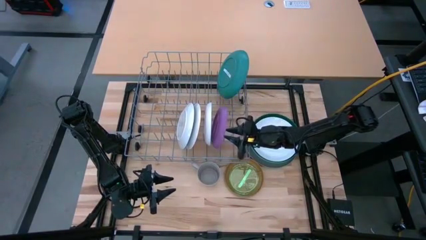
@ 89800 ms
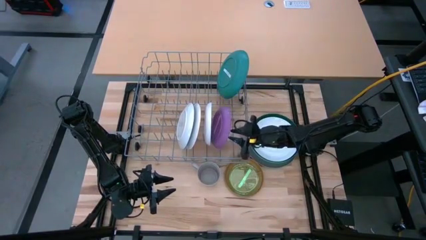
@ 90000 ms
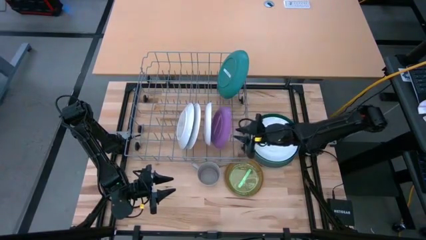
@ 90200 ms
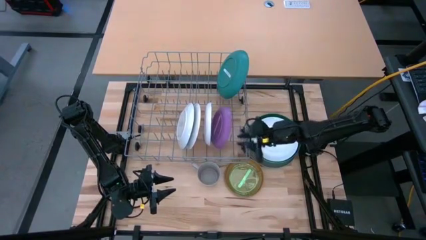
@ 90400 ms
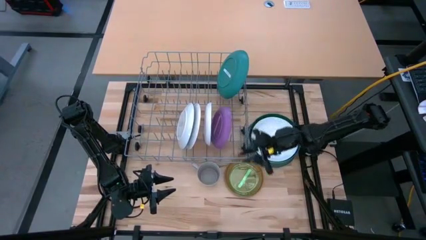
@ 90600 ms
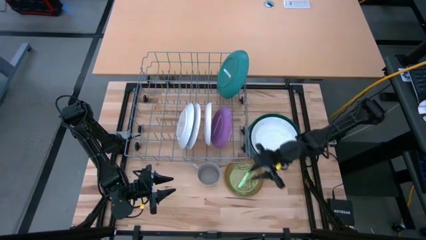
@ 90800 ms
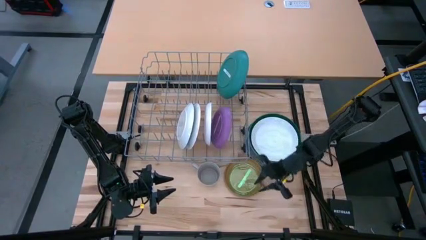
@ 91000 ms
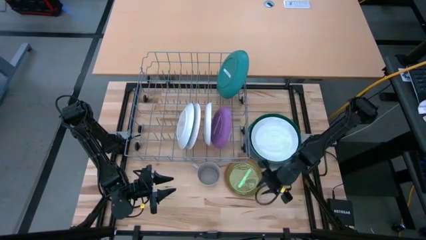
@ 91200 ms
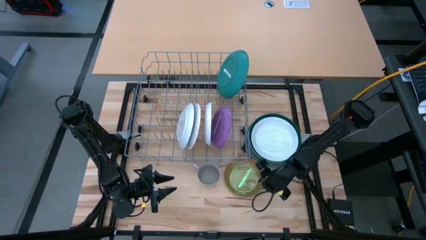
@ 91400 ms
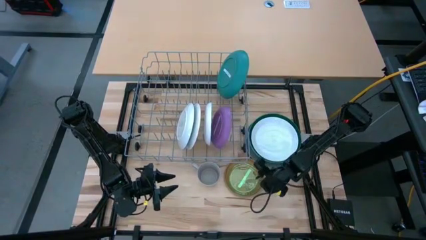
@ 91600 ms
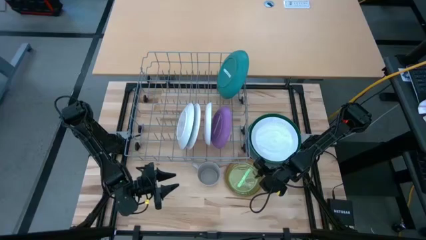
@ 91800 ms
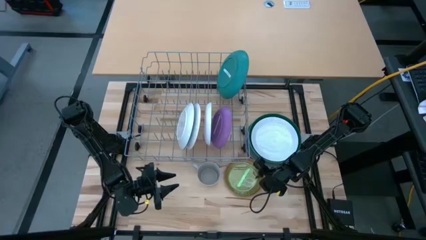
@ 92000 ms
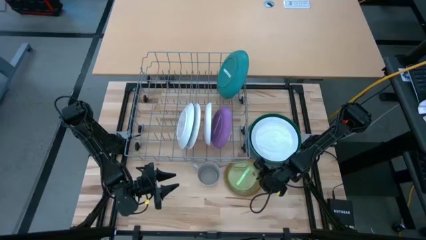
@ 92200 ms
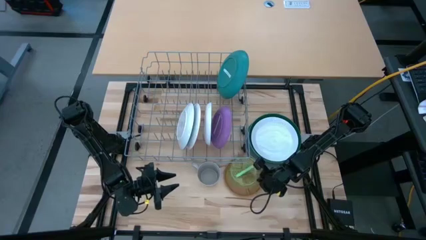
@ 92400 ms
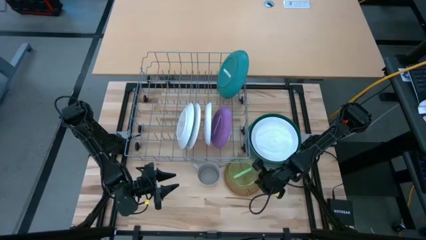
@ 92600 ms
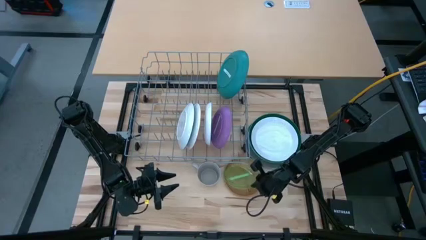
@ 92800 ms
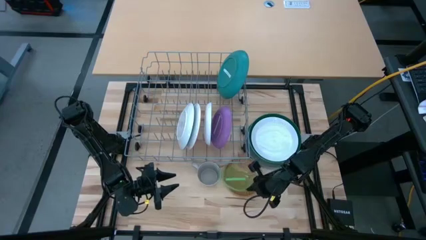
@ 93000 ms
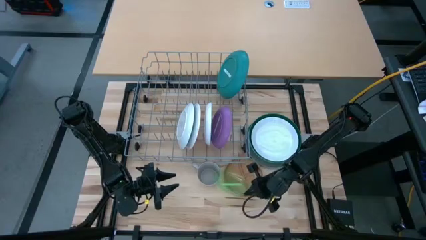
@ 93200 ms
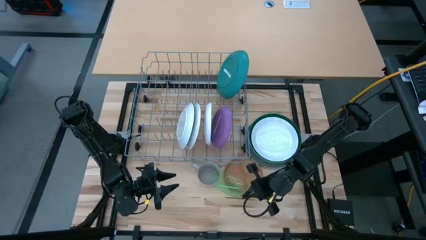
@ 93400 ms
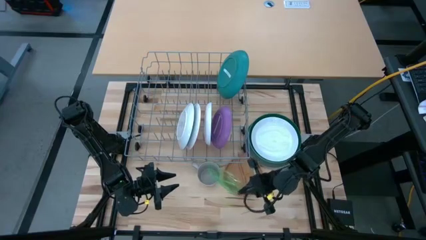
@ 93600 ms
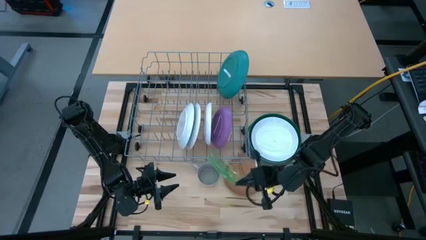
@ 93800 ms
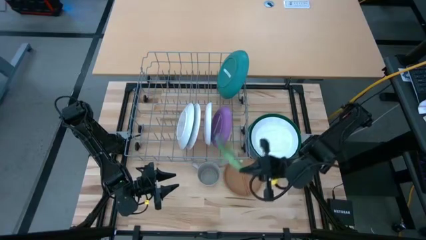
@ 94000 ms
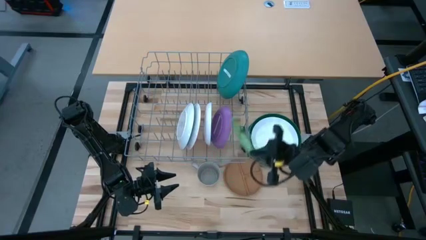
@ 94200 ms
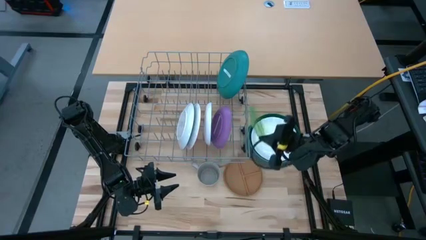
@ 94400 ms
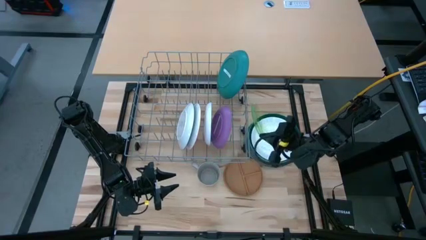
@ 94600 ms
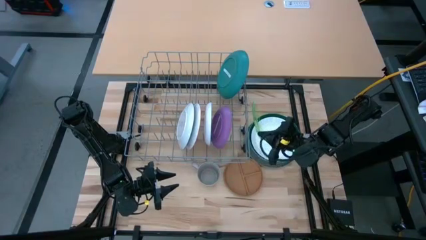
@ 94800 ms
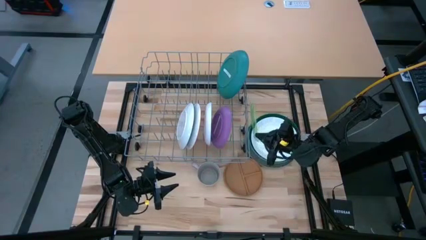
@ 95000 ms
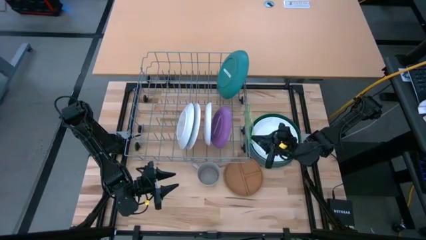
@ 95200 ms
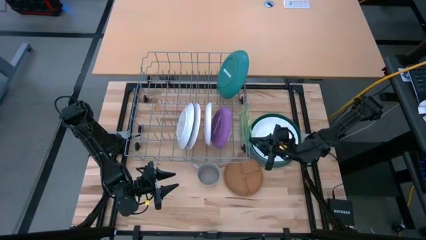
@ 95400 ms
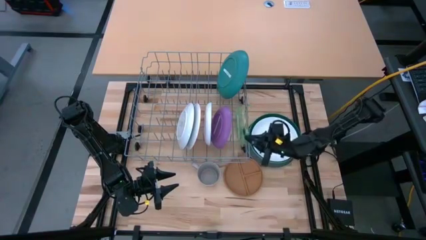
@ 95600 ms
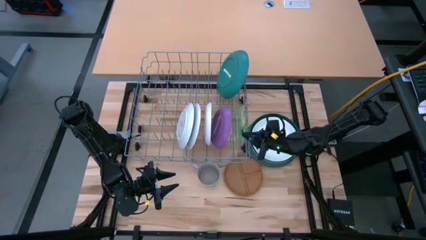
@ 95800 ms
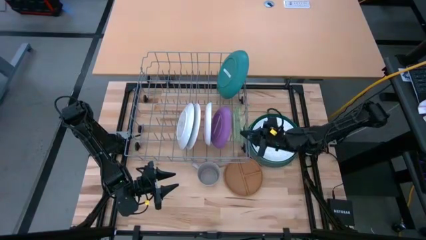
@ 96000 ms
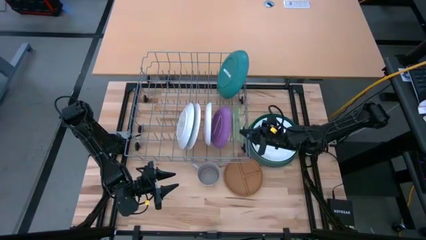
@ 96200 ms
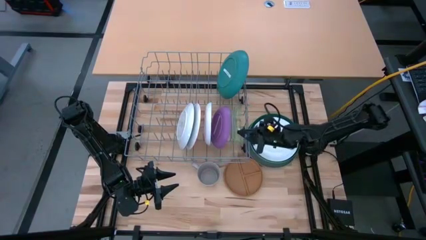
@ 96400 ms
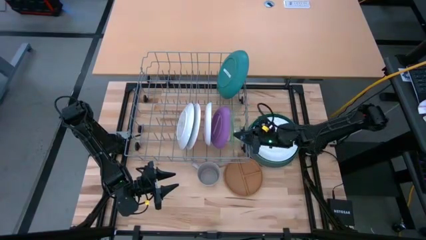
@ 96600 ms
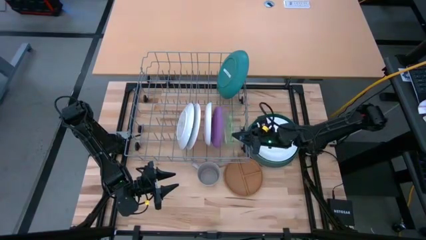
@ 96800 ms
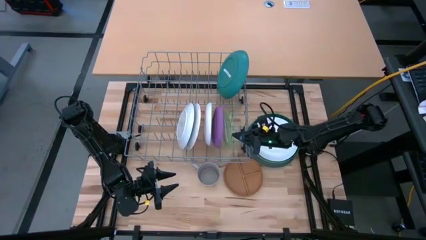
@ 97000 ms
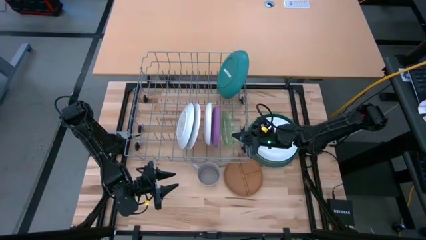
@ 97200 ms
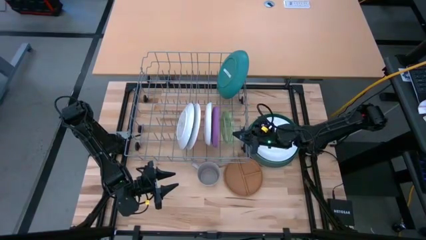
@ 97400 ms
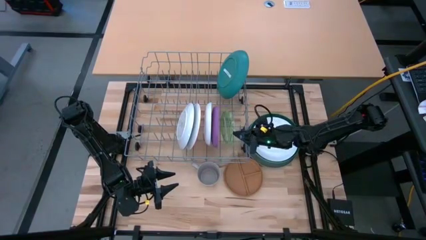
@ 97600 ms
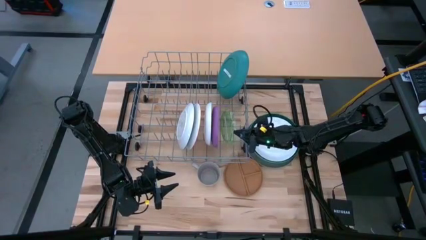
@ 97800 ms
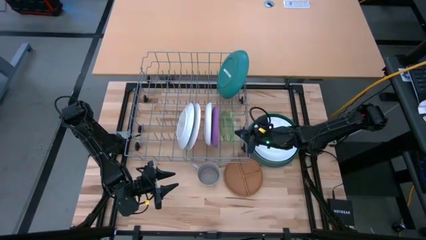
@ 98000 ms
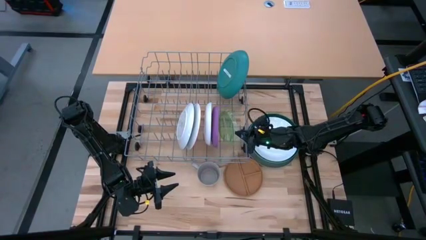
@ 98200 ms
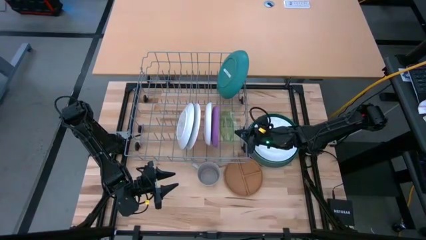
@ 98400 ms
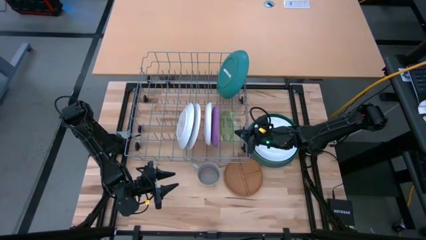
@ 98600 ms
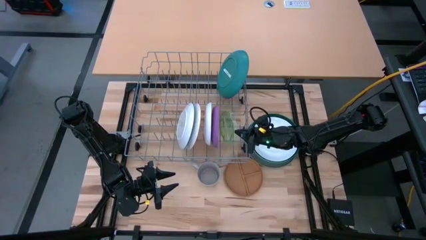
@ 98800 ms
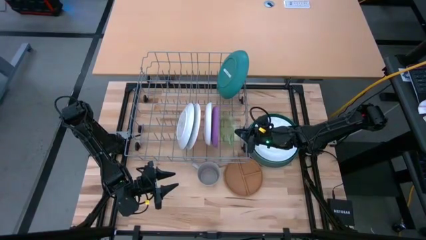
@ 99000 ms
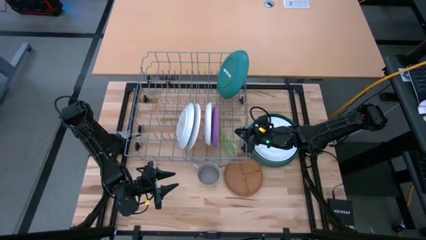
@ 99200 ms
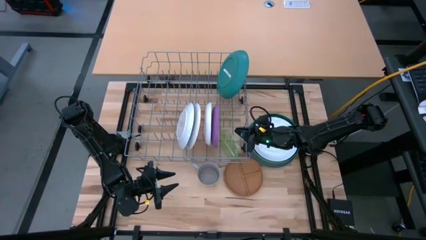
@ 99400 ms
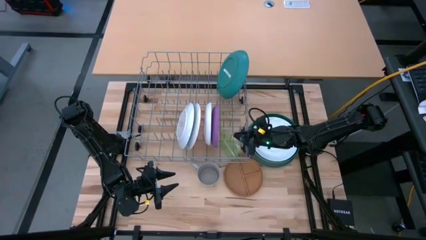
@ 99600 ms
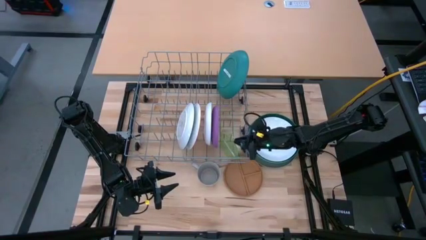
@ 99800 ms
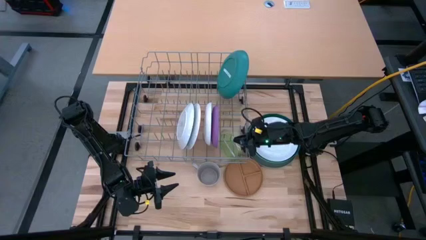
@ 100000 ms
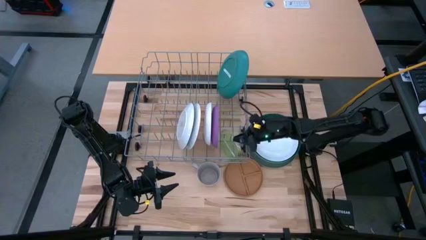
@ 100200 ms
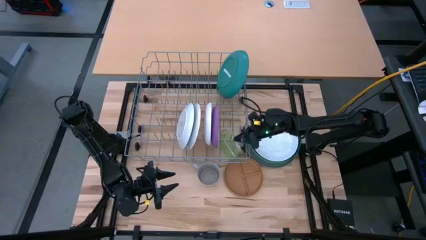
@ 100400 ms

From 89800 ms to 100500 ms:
Task: Sort dishes
Put the green transparent plate in the dish rack

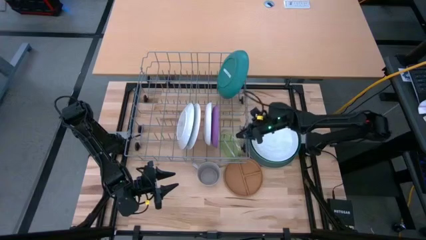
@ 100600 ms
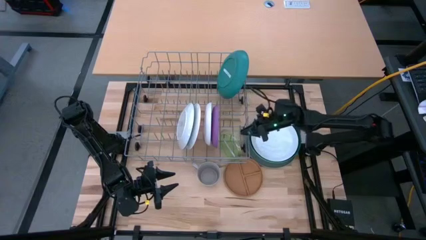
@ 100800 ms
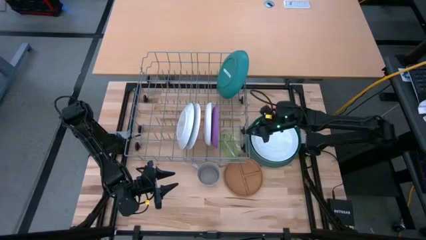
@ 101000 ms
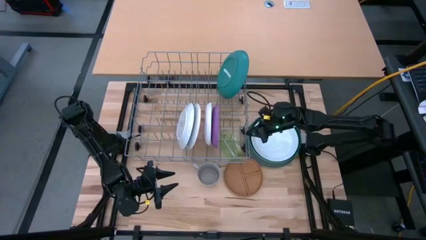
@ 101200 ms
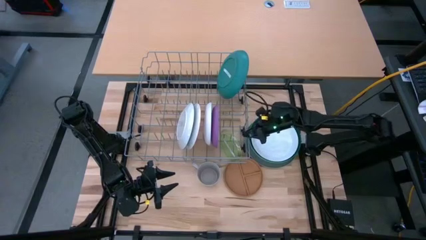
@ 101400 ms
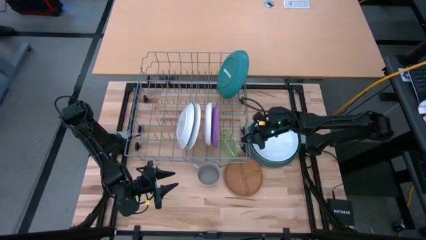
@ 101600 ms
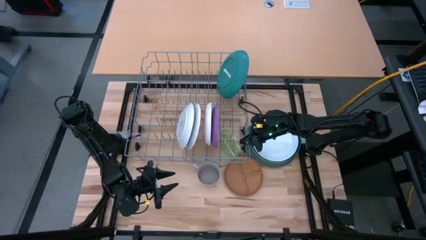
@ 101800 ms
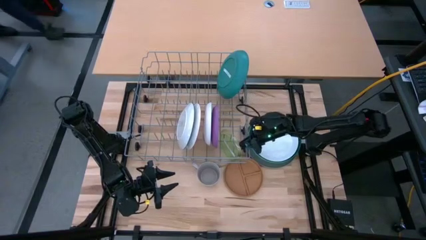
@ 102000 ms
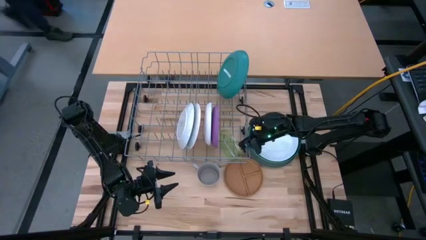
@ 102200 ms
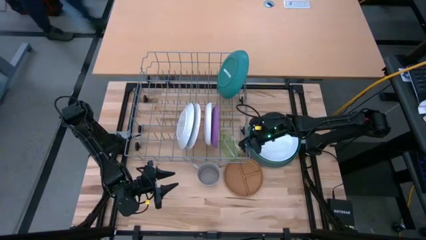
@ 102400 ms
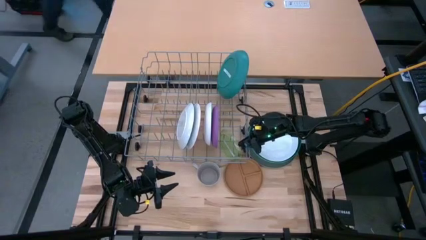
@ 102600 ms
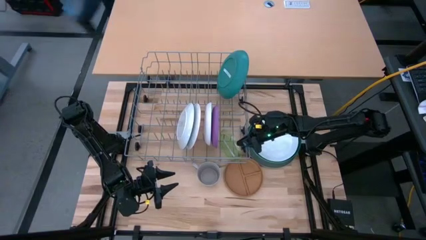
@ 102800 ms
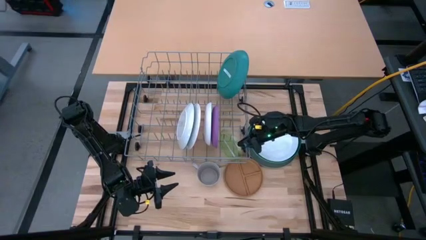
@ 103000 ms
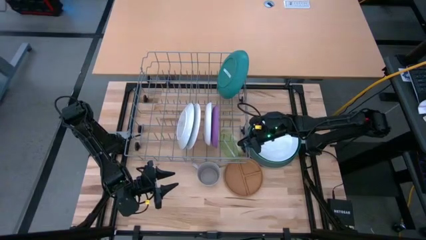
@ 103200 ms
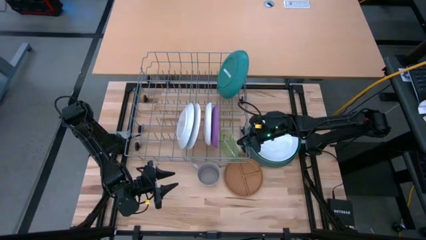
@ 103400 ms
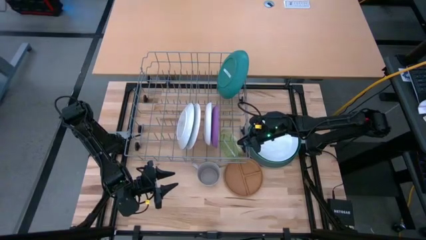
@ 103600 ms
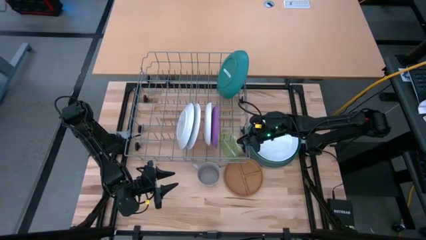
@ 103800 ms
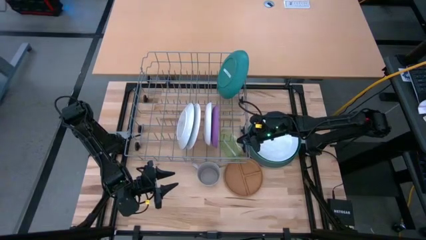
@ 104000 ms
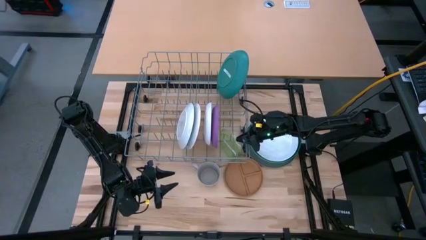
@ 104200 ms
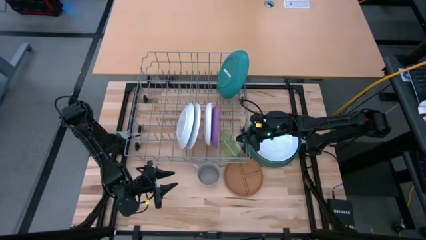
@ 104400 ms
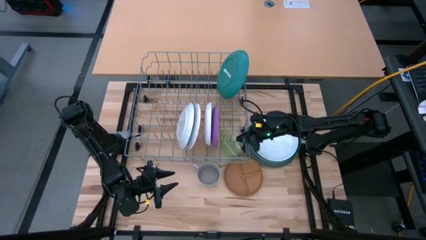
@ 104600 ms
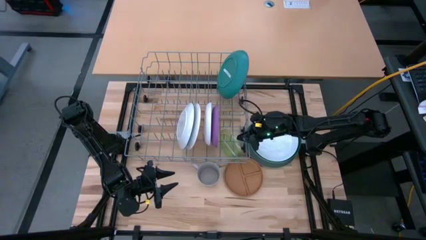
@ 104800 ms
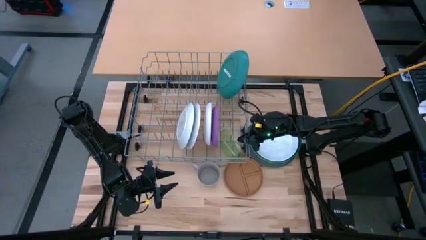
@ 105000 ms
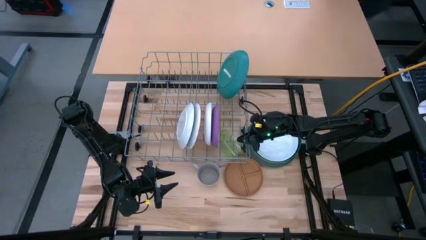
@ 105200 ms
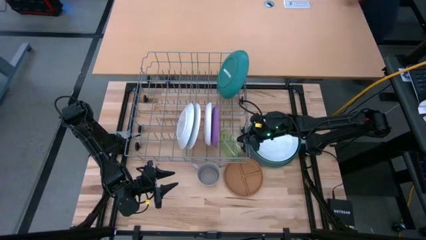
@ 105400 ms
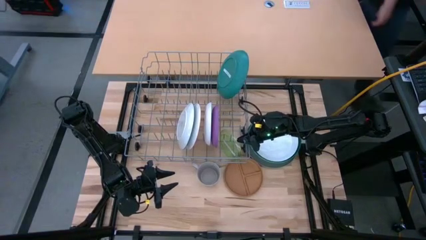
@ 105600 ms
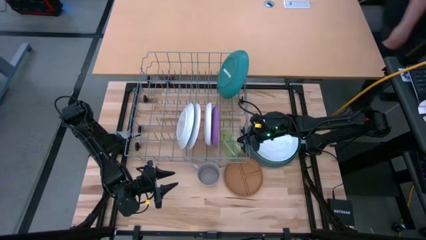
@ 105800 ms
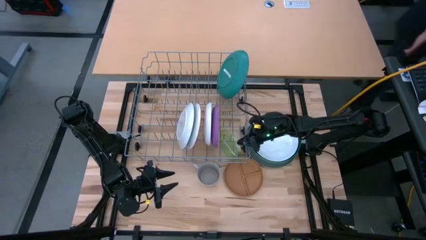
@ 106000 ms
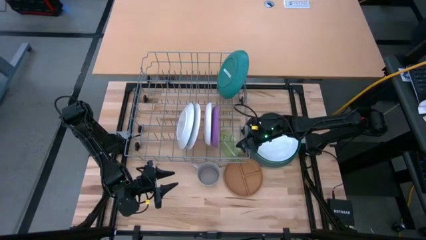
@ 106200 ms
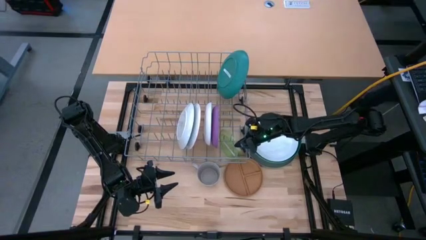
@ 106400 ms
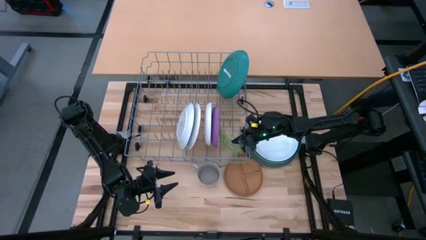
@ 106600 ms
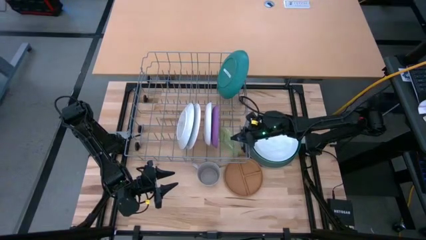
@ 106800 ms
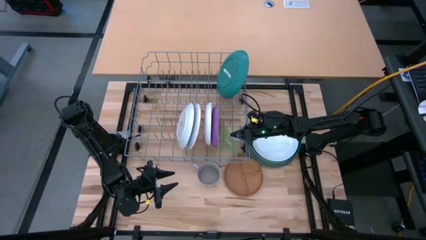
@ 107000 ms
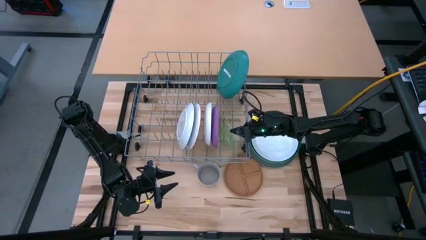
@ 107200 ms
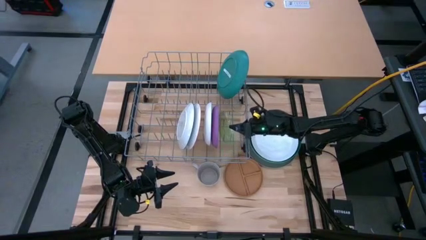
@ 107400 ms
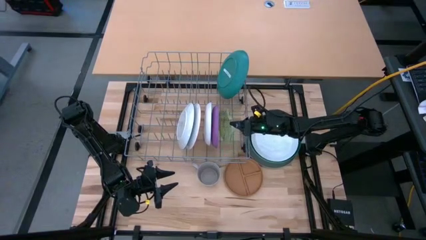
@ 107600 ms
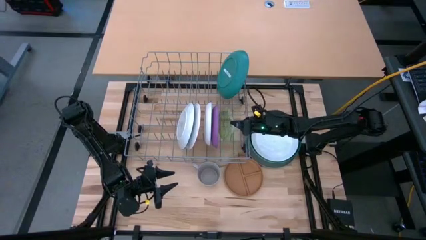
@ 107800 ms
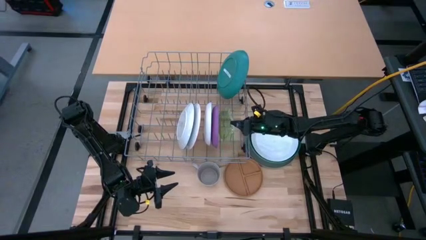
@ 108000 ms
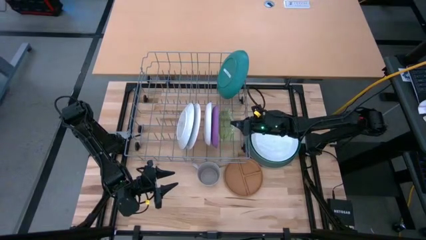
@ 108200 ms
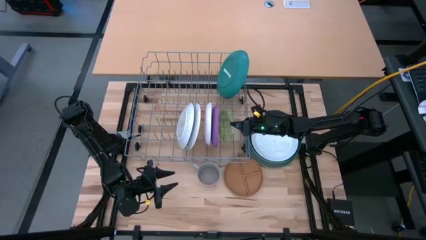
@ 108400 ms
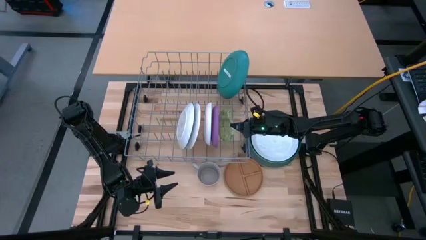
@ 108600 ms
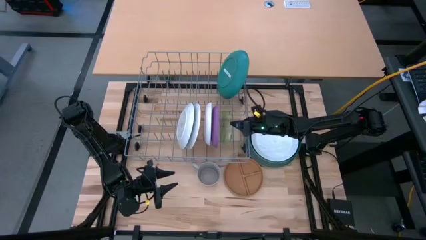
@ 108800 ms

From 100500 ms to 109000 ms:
Put the green transparent plate in the dish rack
